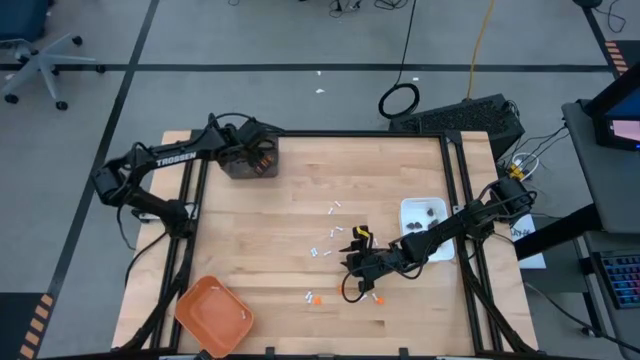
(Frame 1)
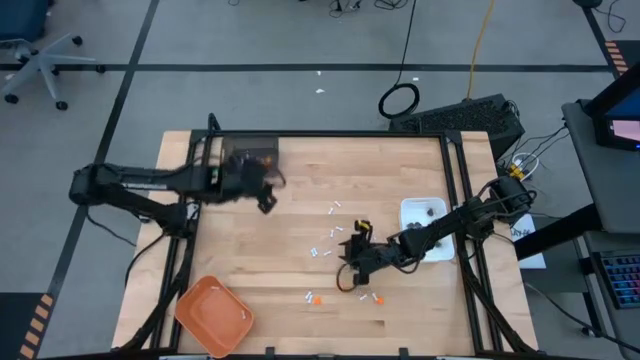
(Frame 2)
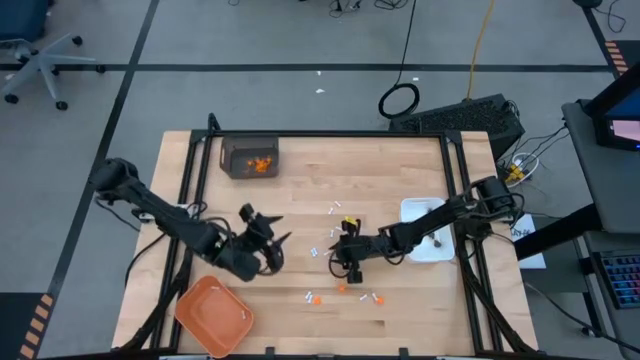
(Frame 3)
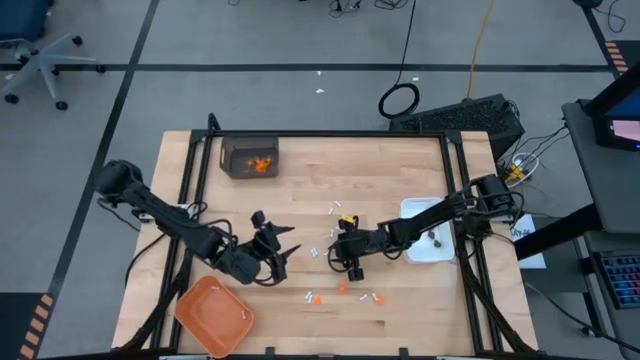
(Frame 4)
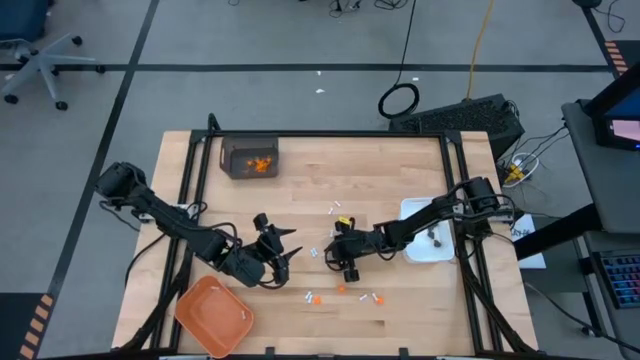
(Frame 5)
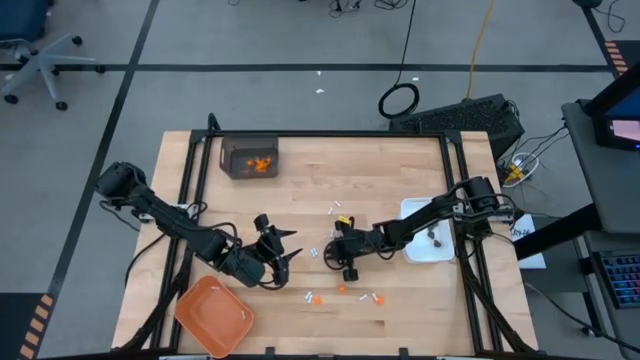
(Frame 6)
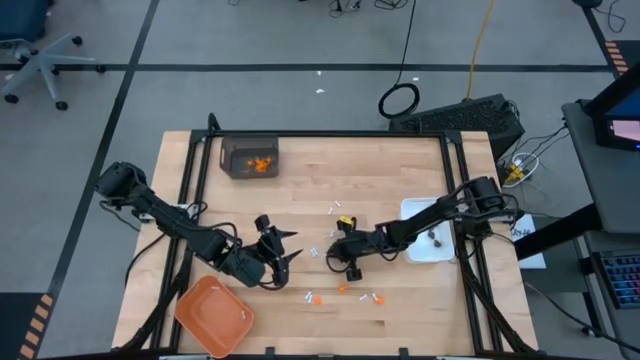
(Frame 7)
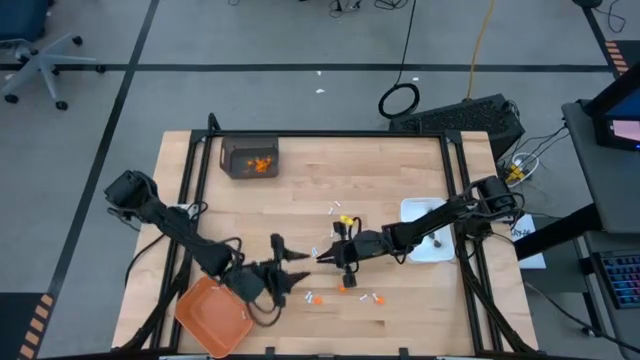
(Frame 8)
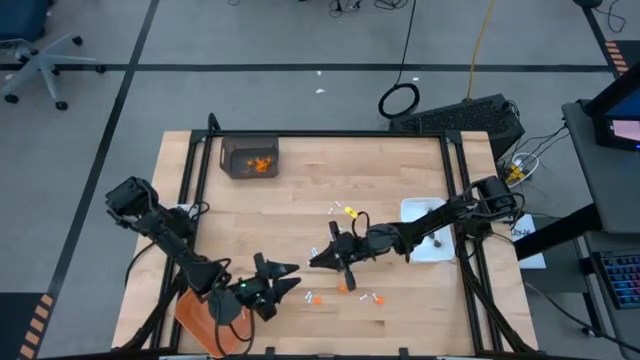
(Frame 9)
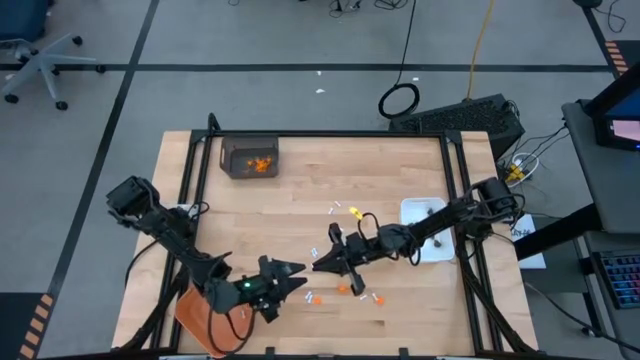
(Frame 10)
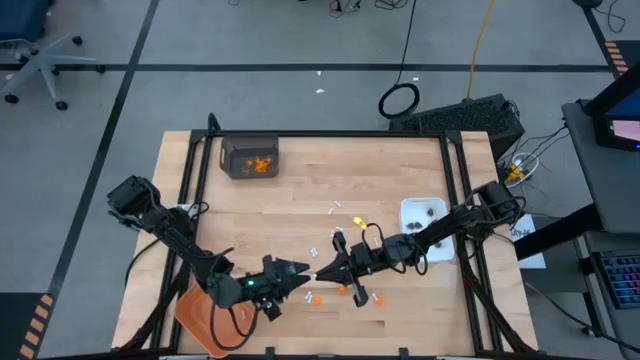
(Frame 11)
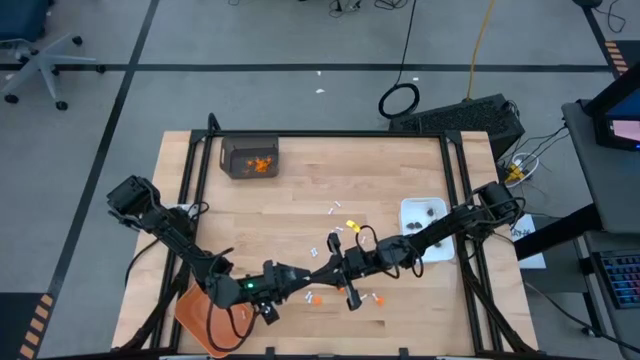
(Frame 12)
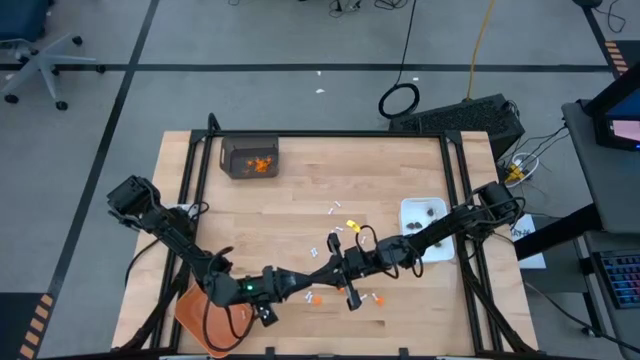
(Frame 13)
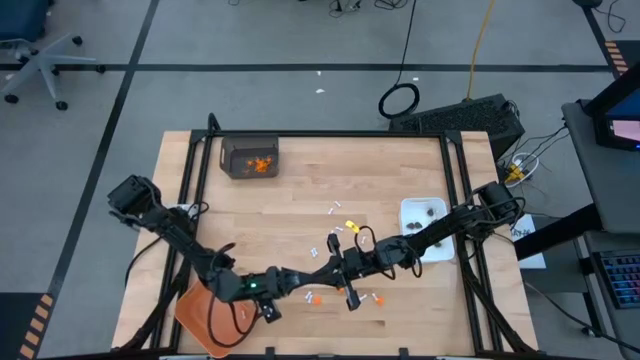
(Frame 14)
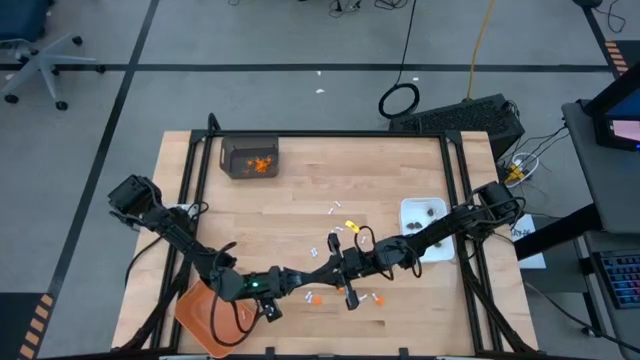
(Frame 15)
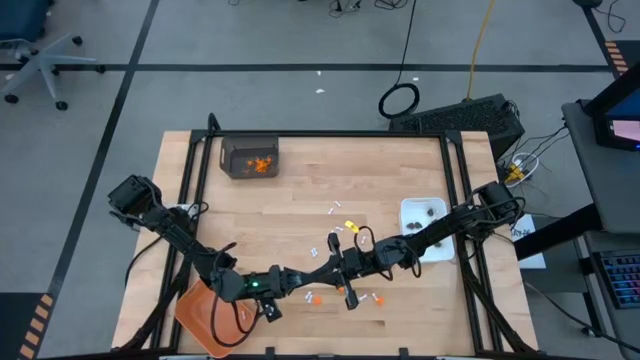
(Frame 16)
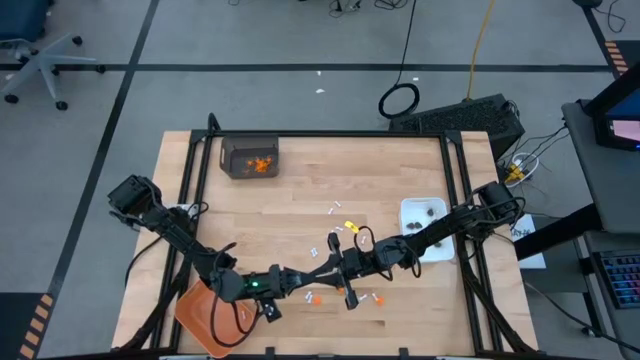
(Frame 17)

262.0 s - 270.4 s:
Task: Sort Halloween decoration
Put the white bone toy into the orange bin

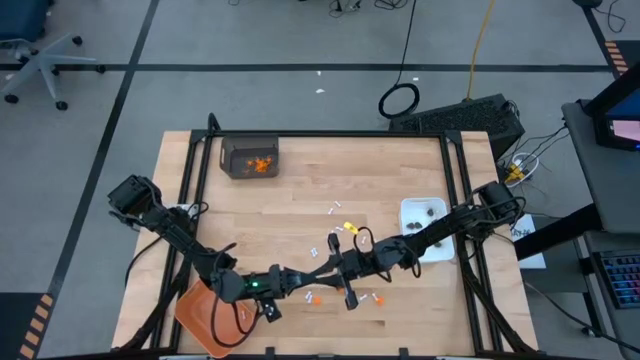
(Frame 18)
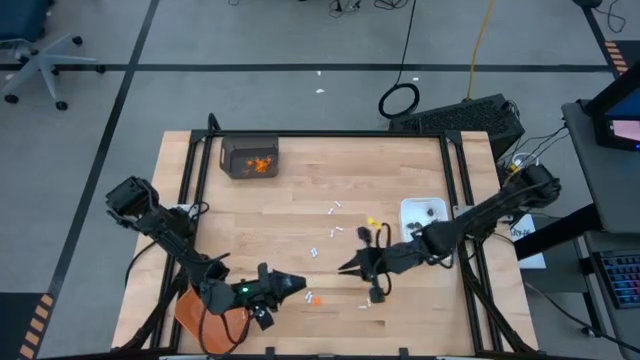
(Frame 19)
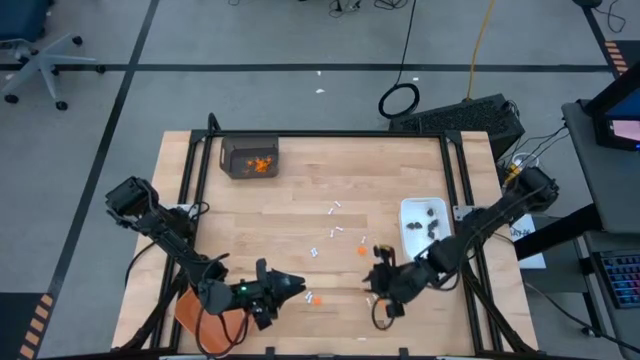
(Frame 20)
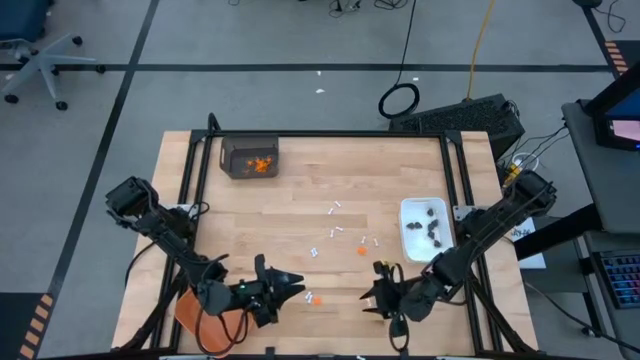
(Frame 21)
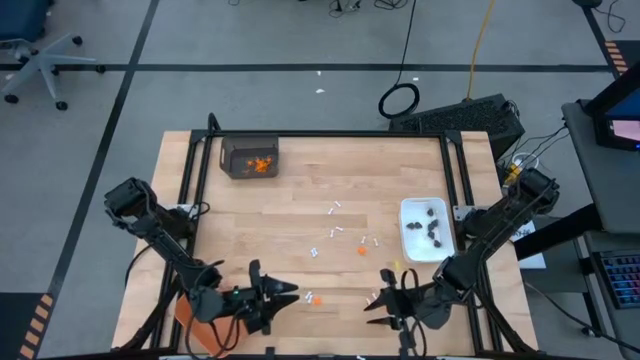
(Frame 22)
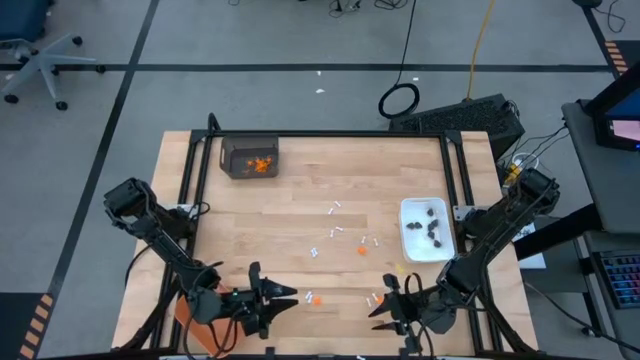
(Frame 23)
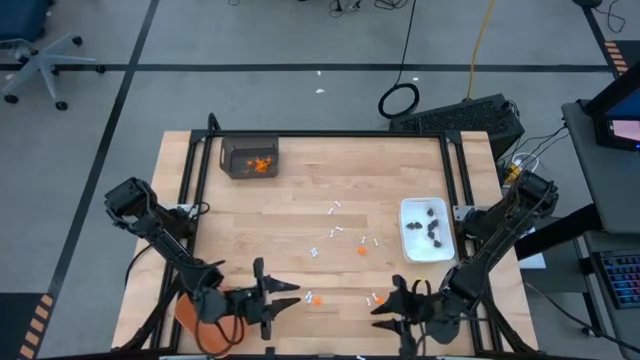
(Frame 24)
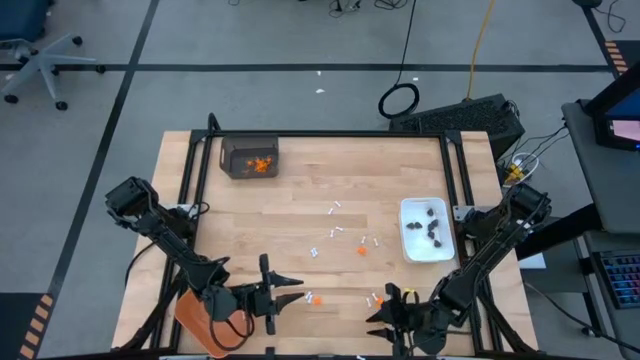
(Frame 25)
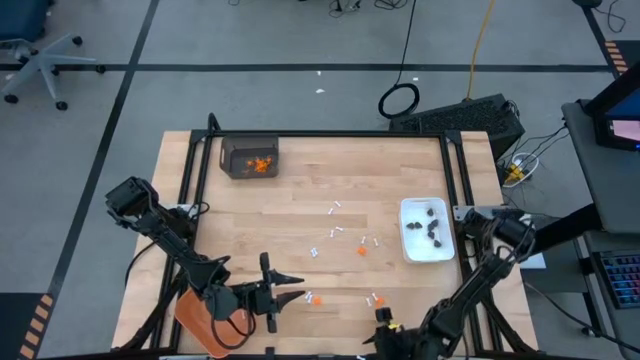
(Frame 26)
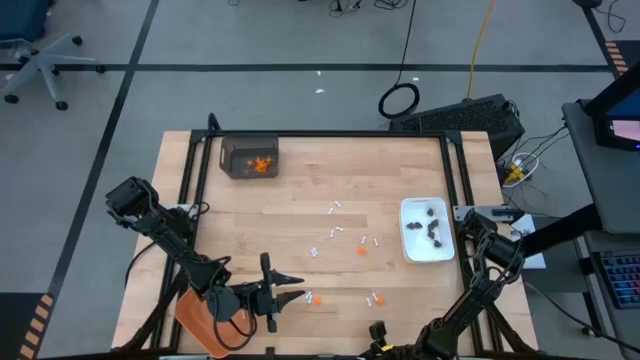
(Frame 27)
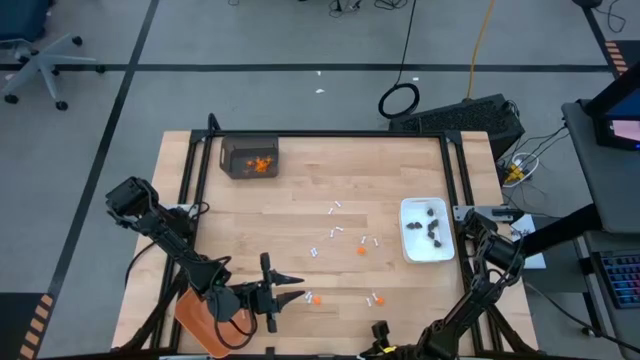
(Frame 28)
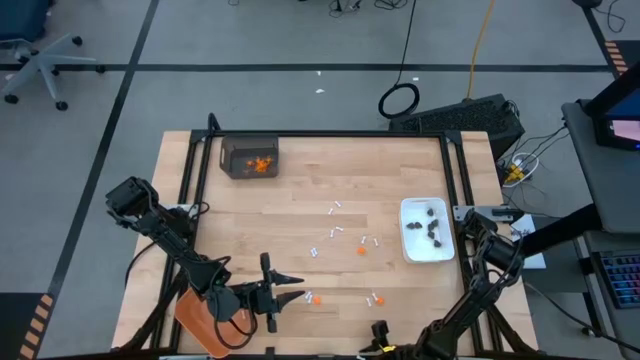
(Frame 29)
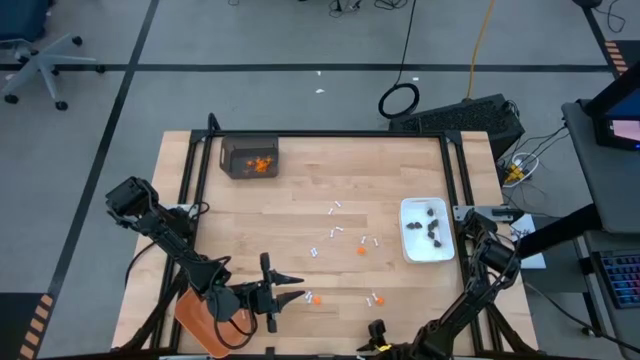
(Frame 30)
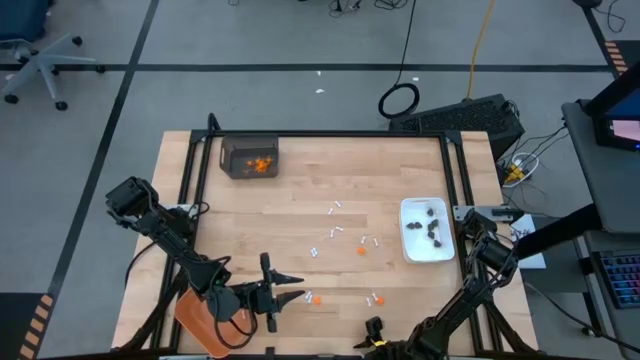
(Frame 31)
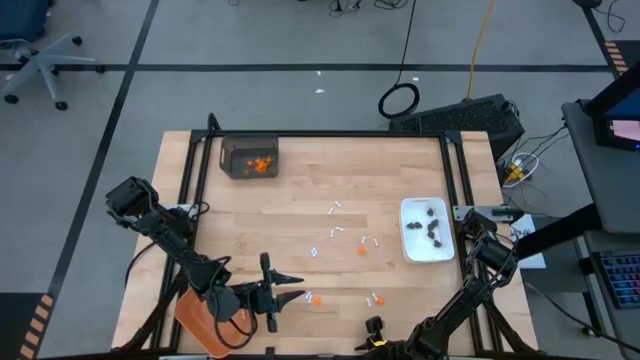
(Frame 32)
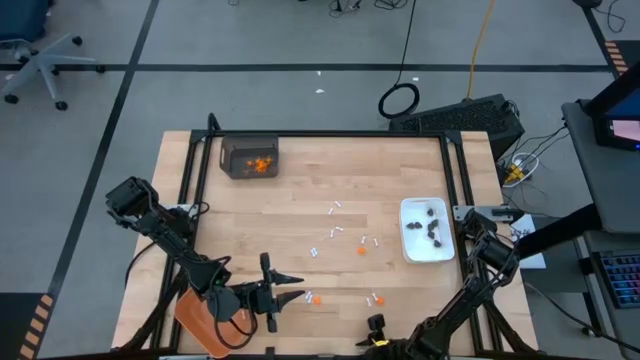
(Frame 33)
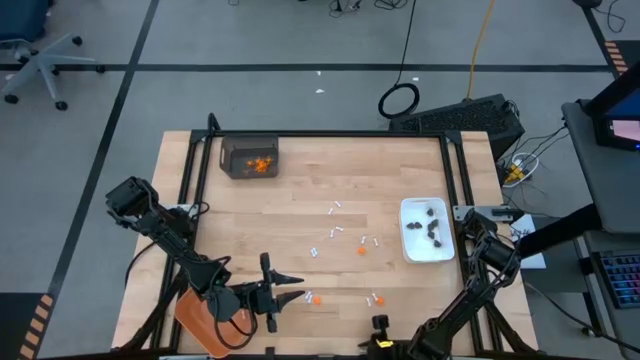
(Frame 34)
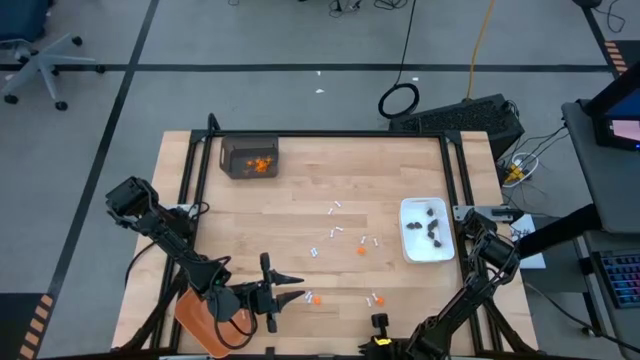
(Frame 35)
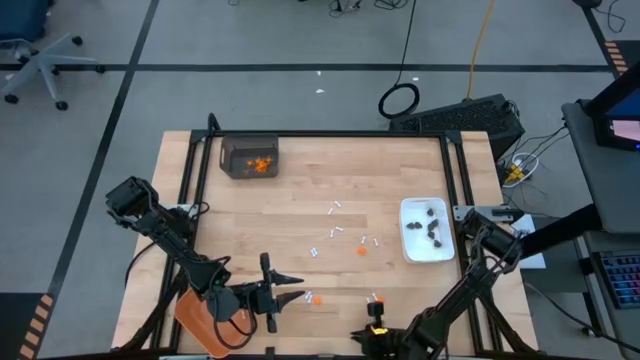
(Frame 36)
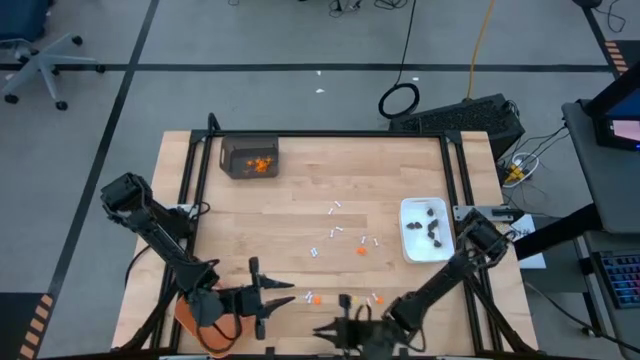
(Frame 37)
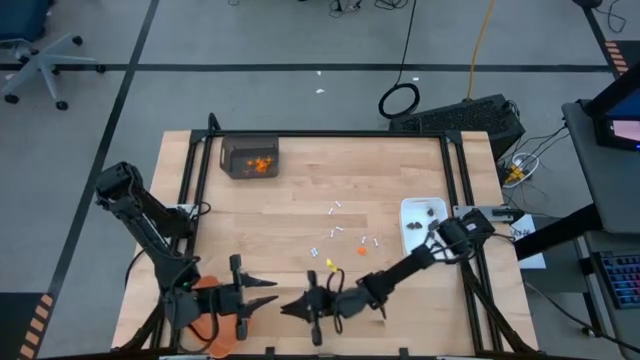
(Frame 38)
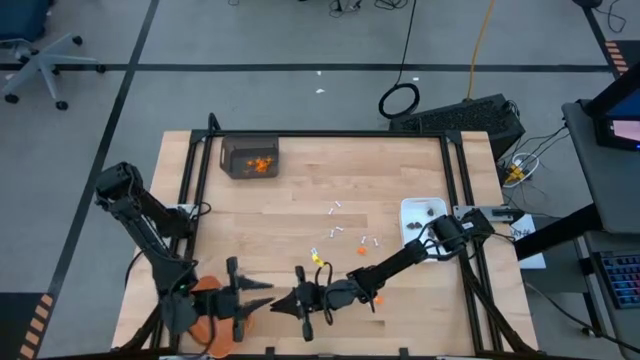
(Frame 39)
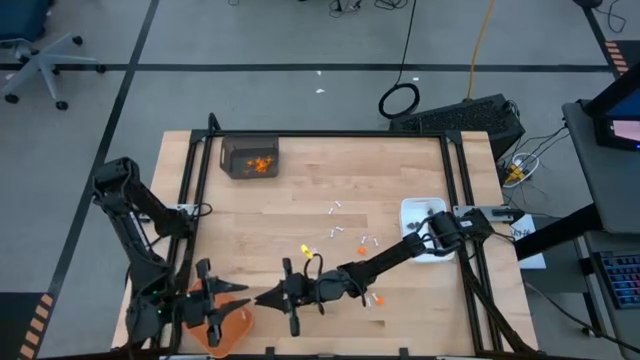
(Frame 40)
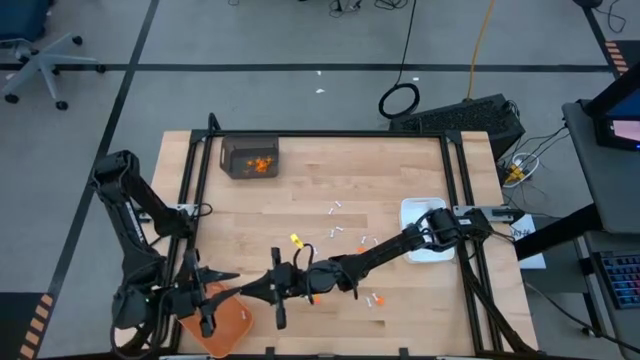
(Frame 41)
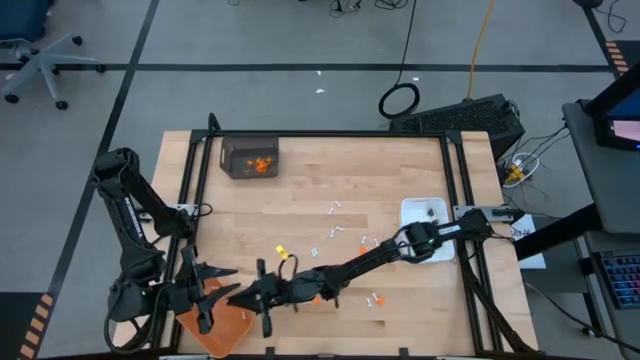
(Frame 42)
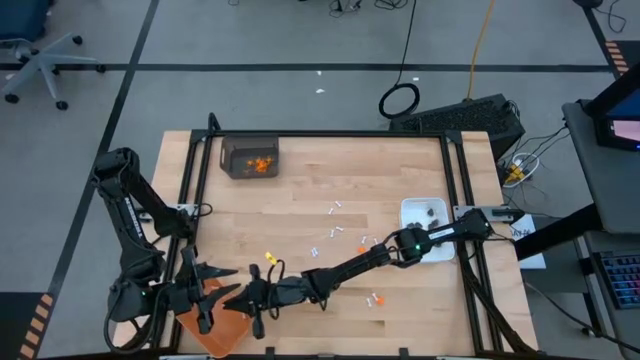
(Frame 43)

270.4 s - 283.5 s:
Put the white bone toy into the orange bin
